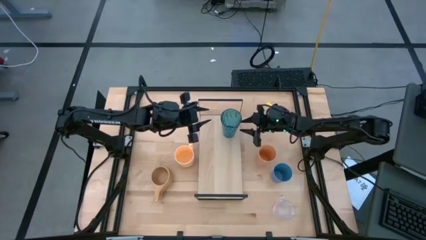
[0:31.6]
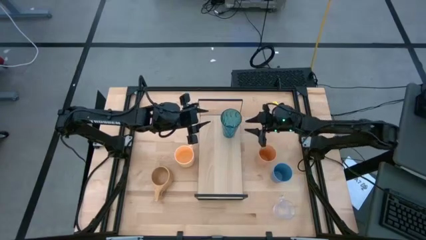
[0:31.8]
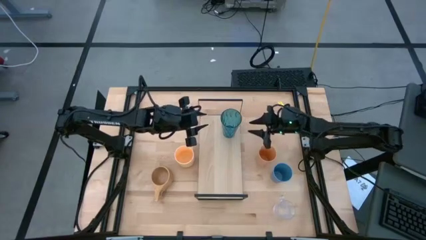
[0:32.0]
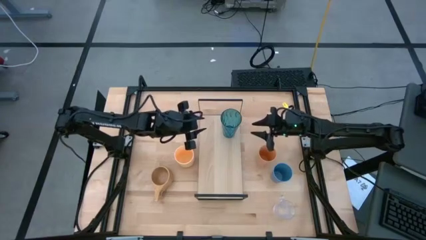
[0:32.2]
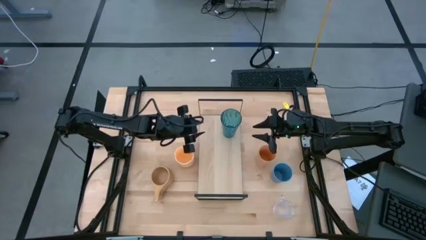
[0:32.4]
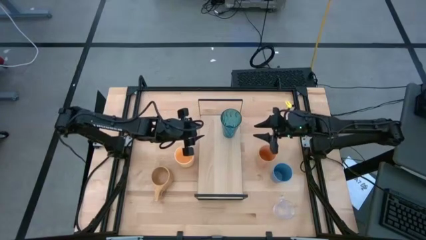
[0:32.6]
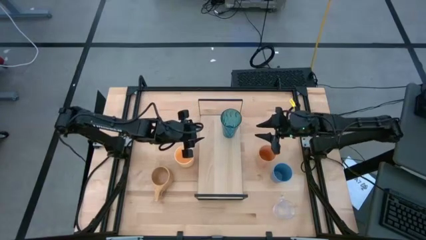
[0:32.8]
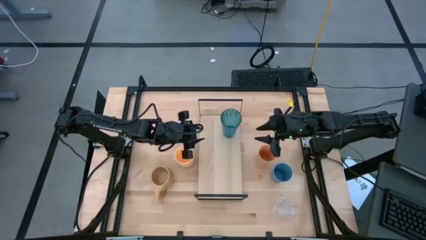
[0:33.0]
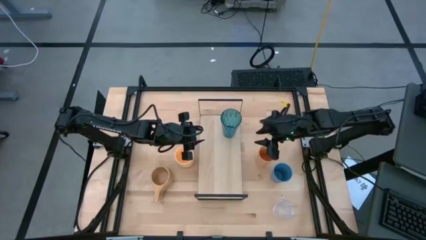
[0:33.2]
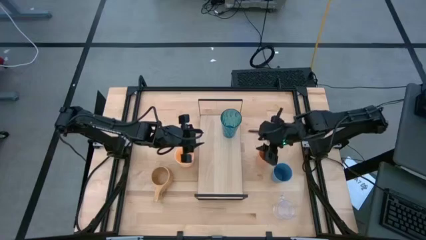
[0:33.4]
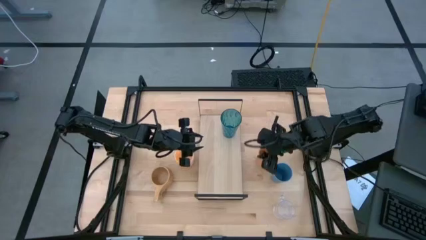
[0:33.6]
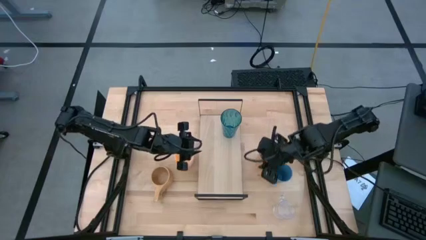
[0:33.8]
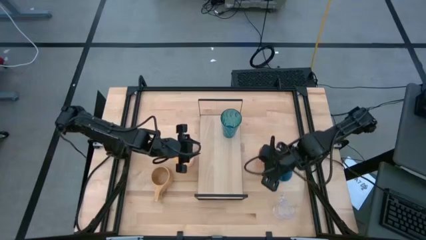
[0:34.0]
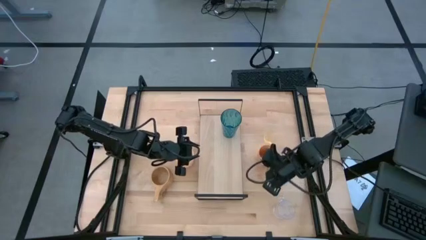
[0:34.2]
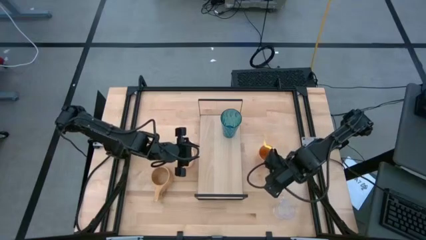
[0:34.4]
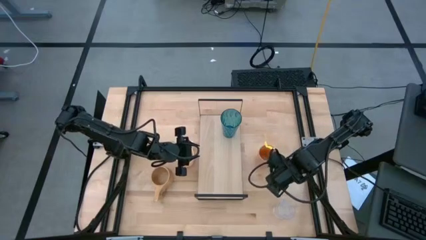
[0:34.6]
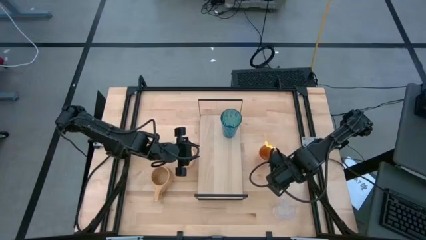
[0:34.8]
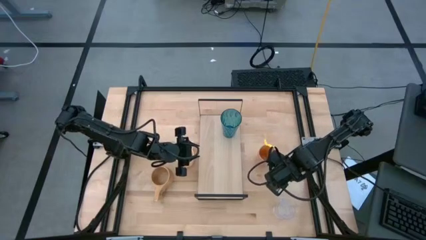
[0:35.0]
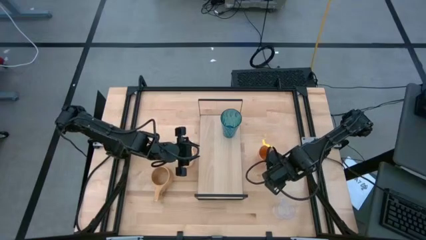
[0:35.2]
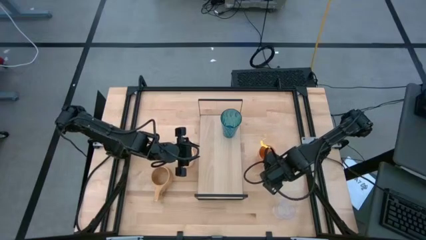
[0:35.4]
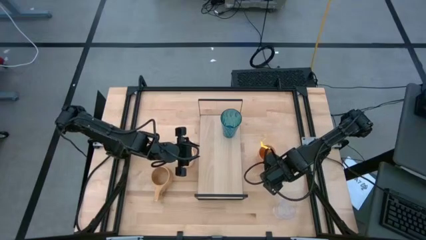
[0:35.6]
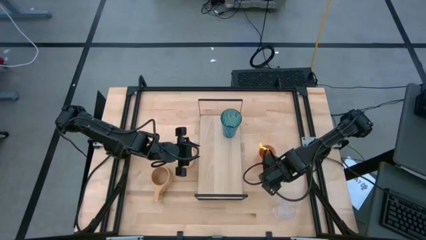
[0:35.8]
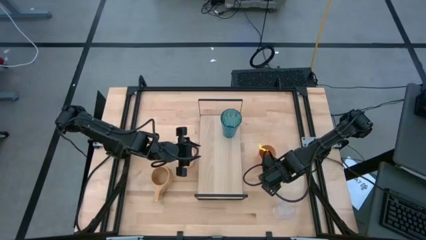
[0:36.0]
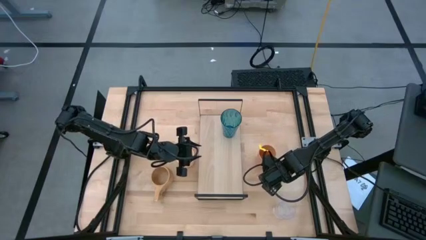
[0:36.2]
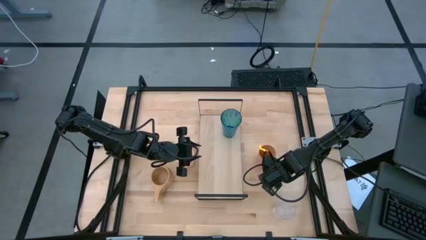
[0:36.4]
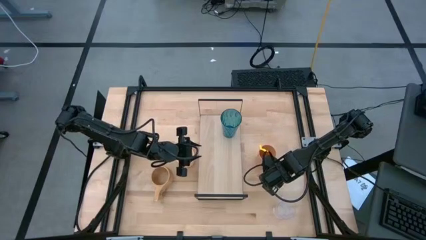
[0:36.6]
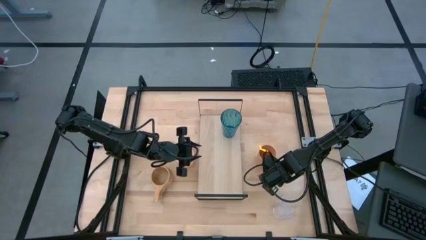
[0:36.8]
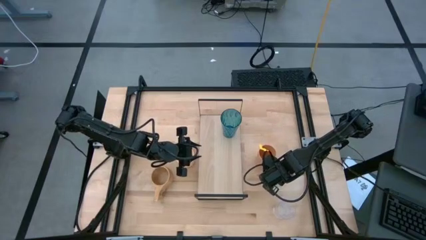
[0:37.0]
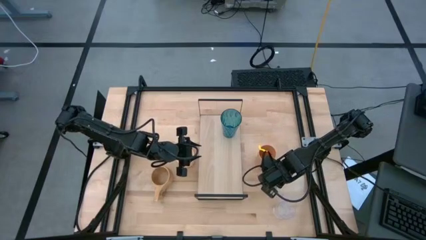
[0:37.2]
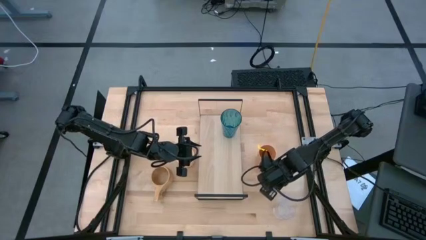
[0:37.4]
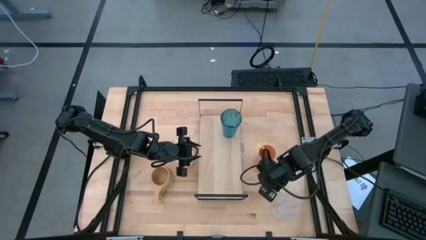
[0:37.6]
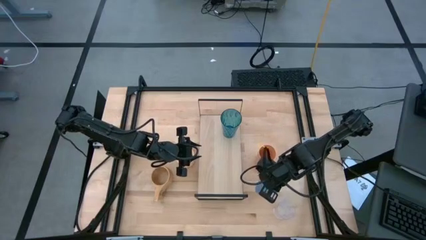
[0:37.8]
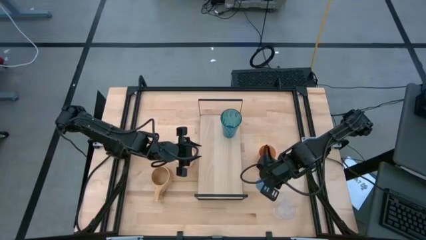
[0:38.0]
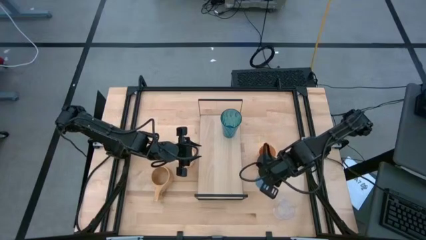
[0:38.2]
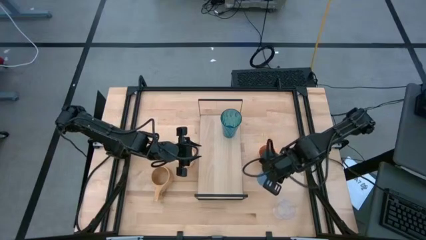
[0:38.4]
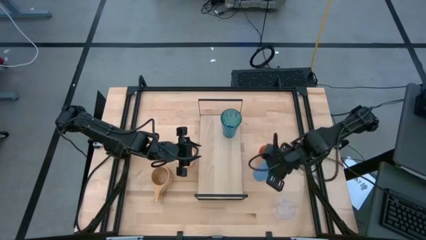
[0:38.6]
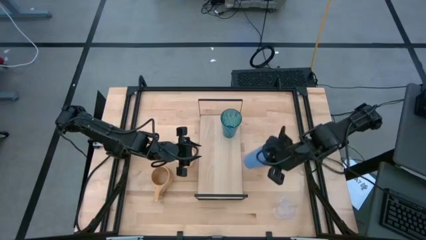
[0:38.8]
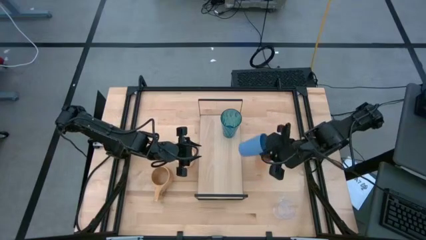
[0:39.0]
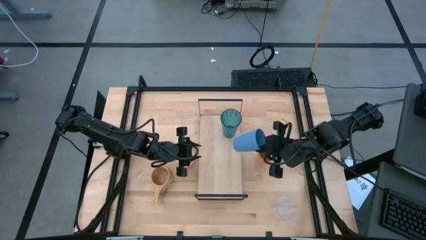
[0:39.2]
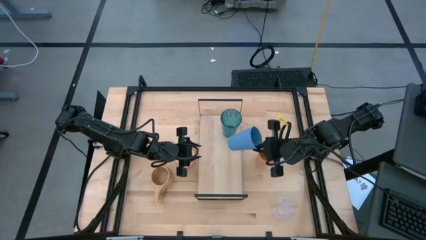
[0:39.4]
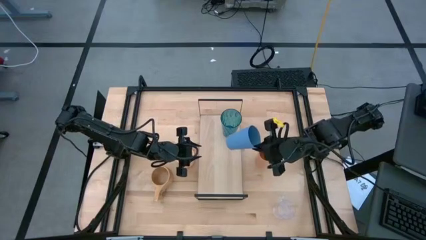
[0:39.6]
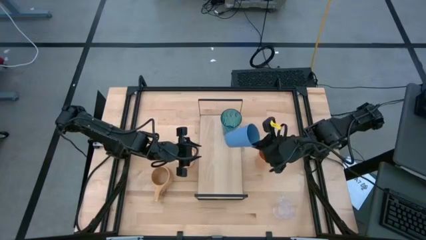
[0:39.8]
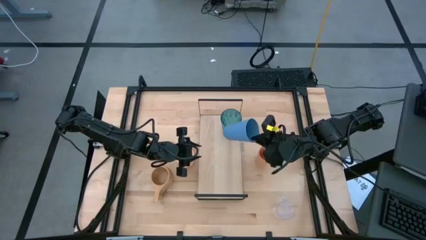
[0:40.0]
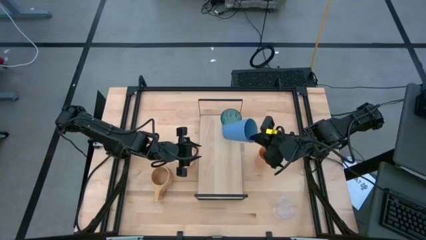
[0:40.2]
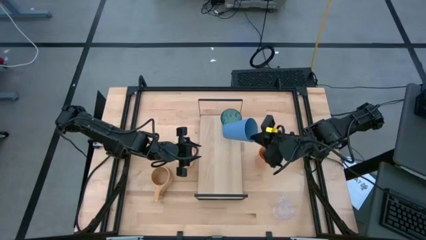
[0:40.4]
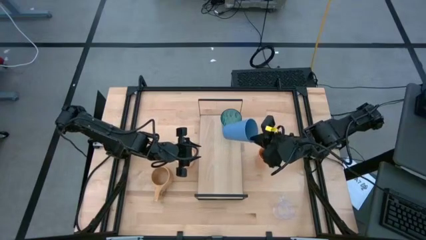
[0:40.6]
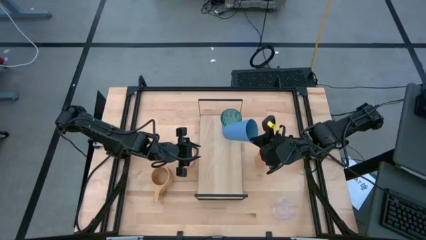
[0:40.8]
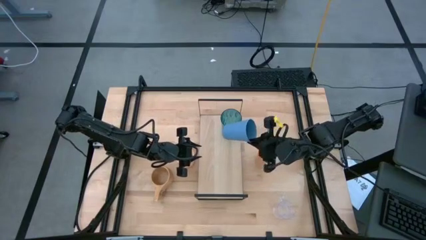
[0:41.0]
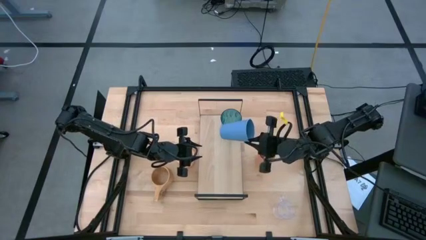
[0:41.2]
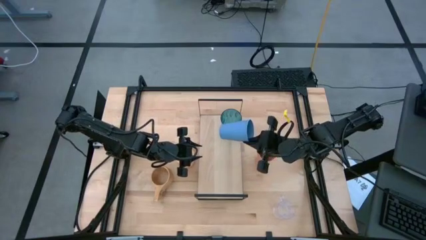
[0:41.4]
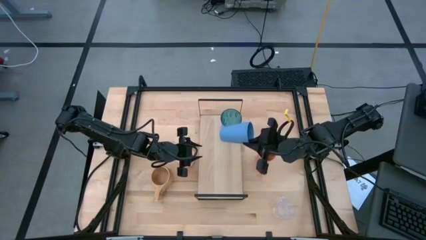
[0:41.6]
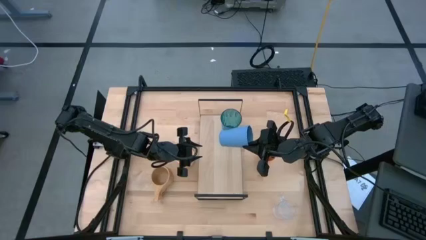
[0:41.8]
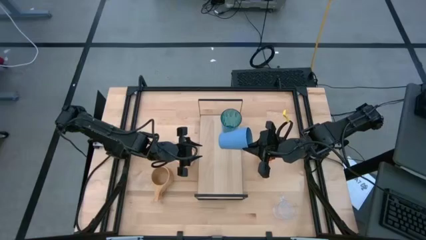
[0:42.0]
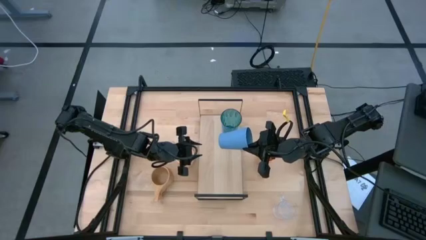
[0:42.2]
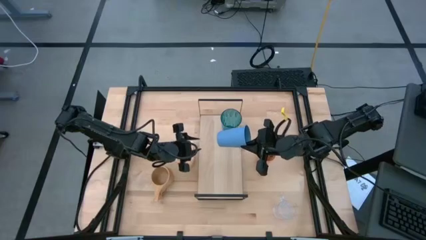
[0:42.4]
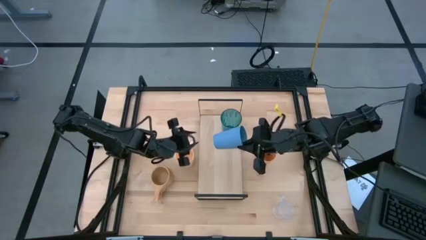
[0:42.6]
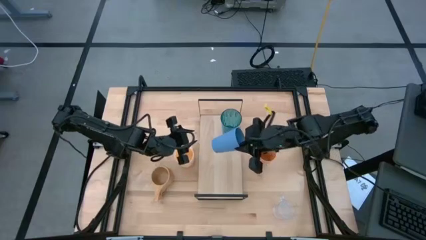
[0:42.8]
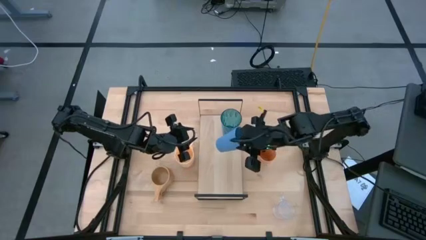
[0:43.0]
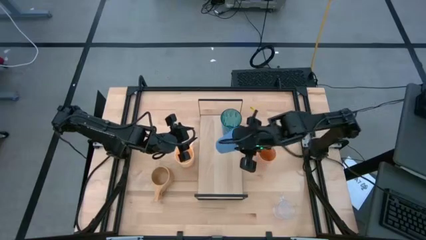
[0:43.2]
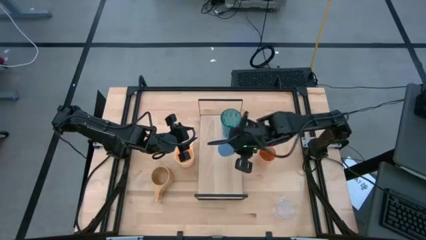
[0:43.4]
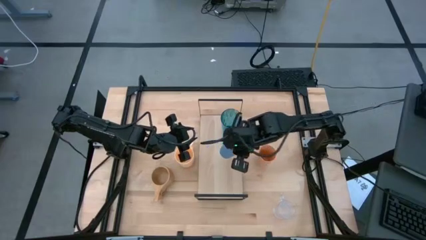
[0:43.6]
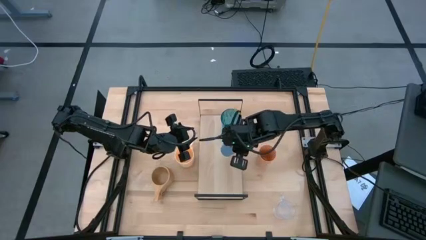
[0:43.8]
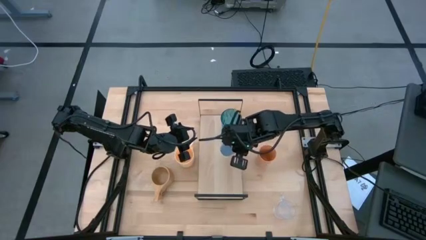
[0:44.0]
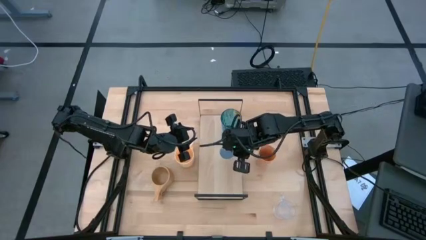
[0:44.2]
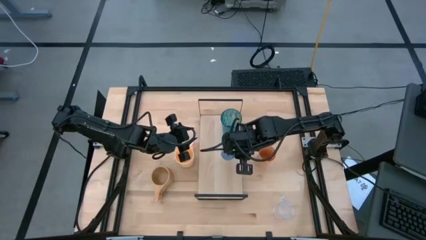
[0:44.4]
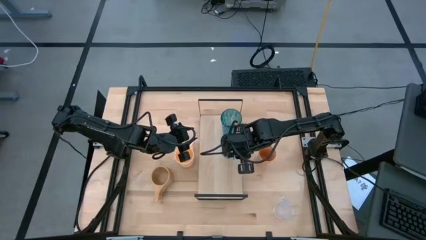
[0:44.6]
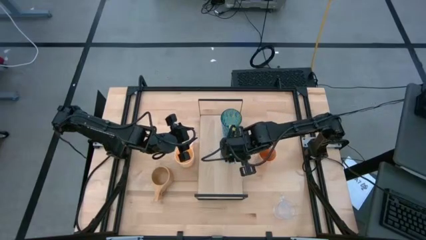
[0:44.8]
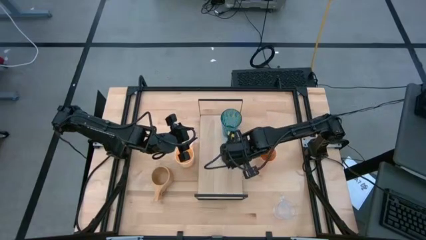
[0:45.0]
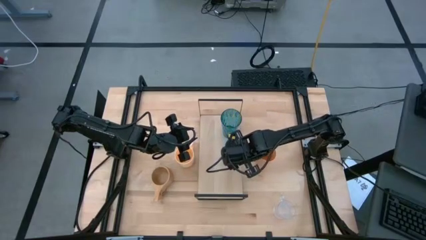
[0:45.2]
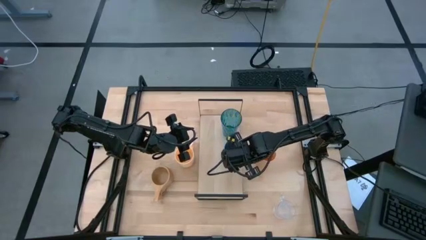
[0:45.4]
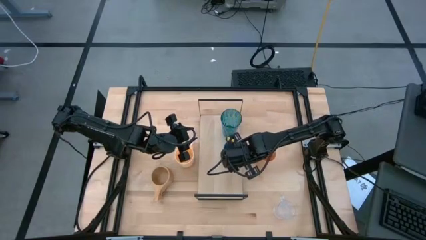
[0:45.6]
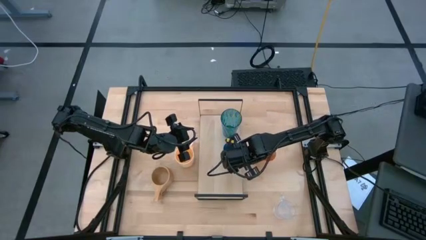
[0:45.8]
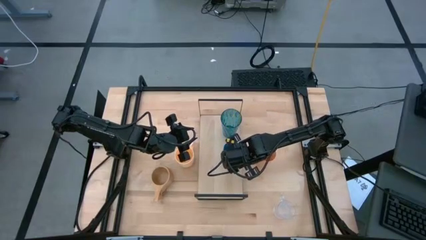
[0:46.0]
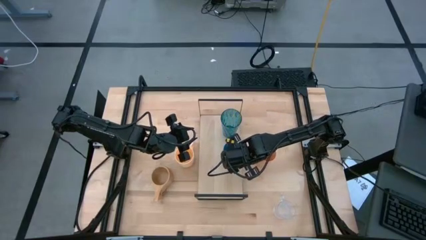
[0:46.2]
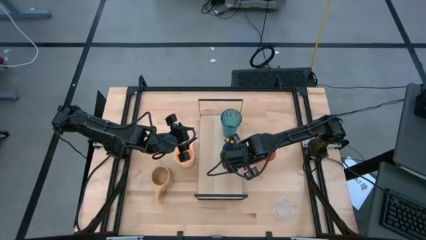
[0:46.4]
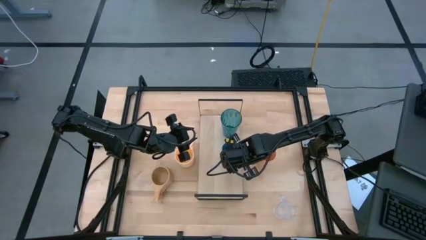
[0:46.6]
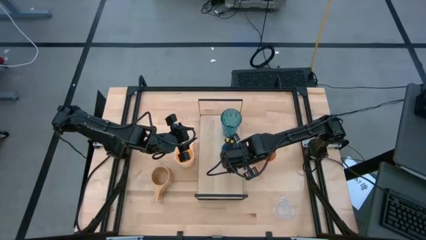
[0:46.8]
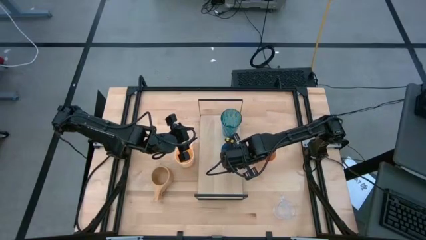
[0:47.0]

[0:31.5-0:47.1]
Task: Stack small to large cups/mugs on shelf
Put the blue cup on the shelf

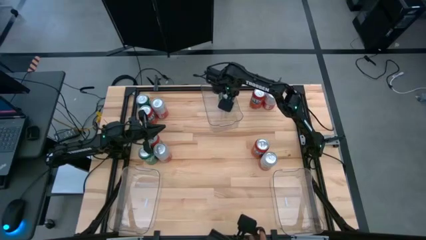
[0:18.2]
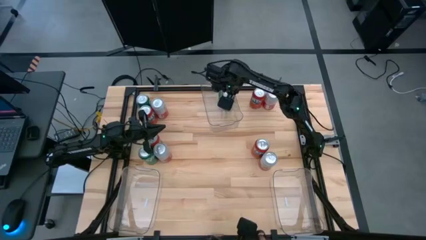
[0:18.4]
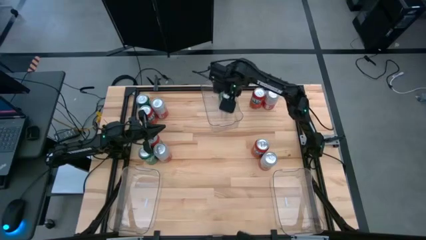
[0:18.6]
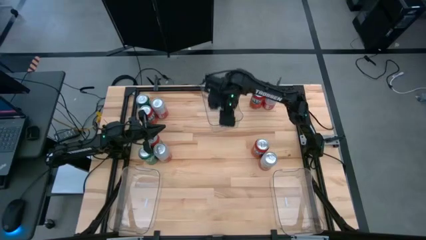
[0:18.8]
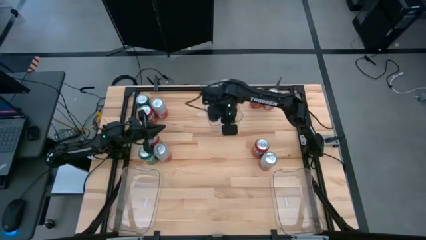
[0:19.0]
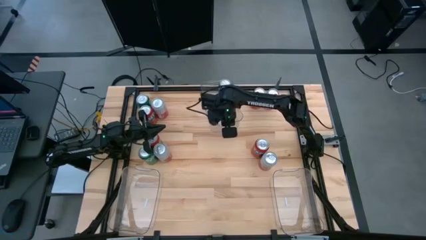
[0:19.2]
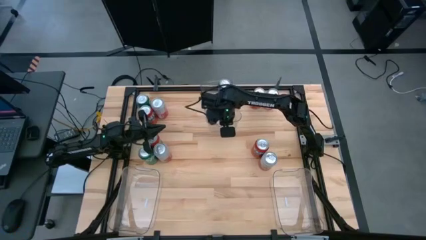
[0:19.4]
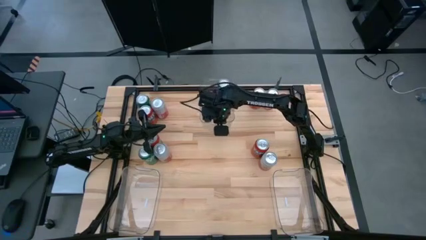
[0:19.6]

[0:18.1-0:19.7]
Task: Sort soda cans
Adjust the top transparent bin on the table
